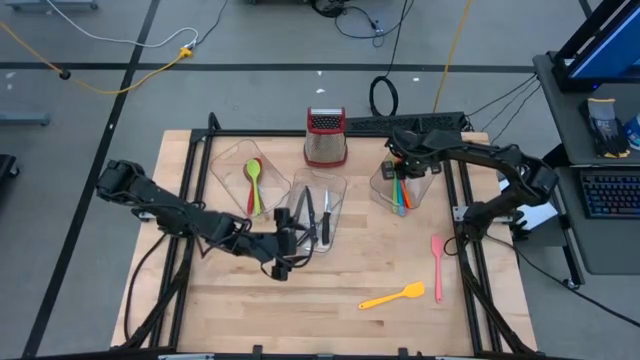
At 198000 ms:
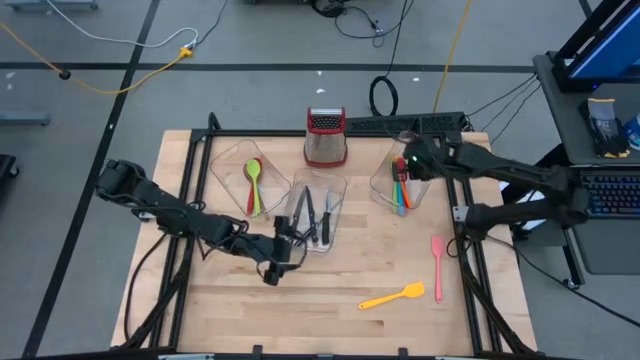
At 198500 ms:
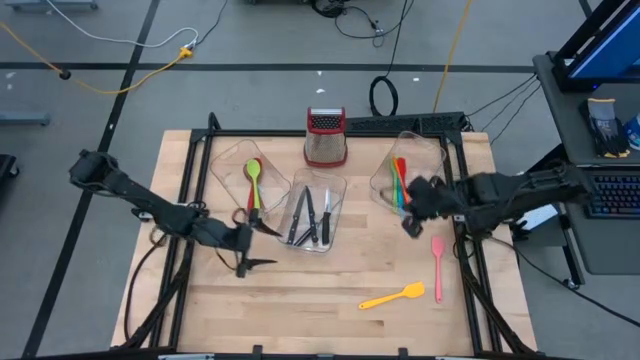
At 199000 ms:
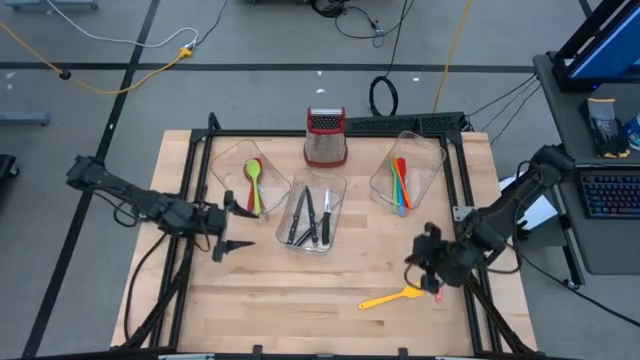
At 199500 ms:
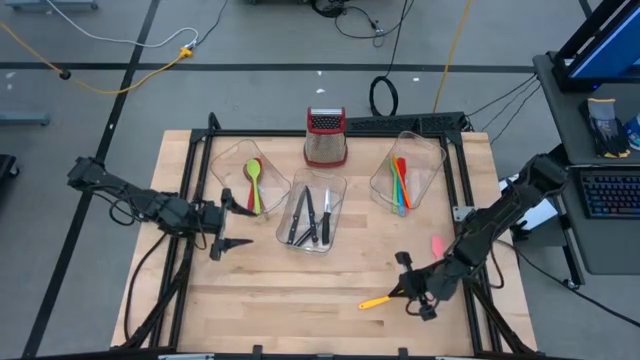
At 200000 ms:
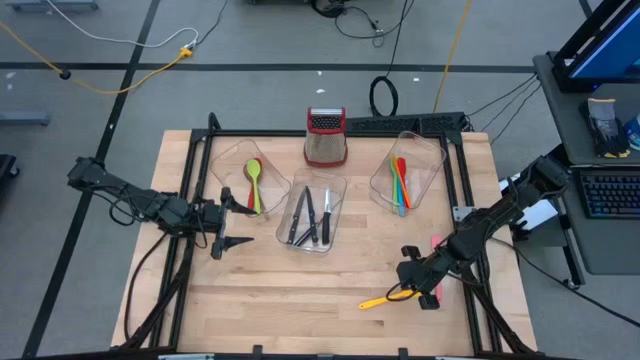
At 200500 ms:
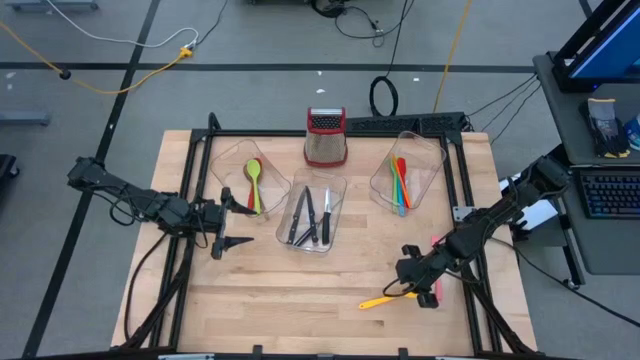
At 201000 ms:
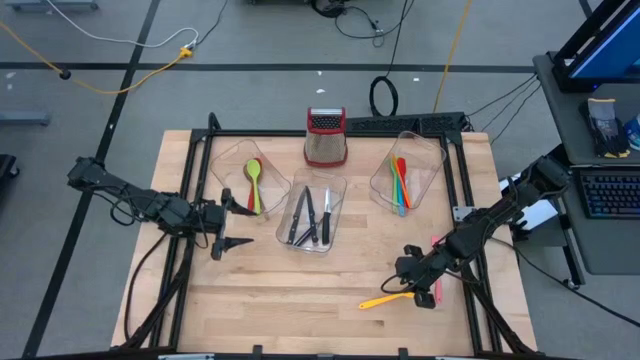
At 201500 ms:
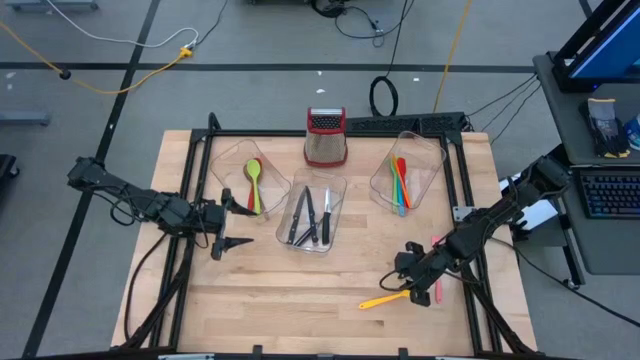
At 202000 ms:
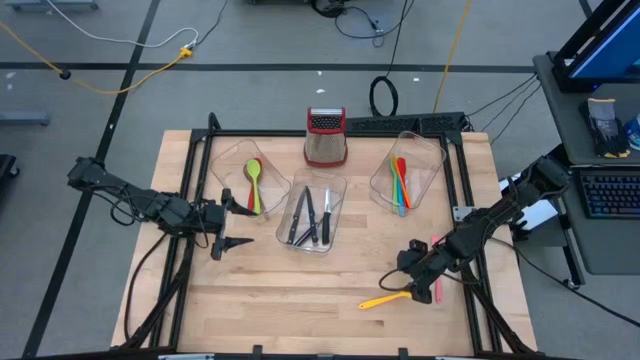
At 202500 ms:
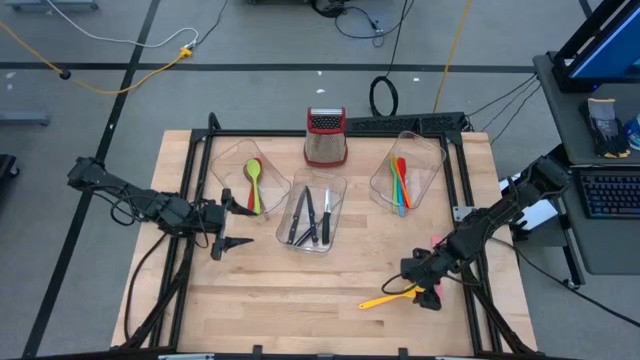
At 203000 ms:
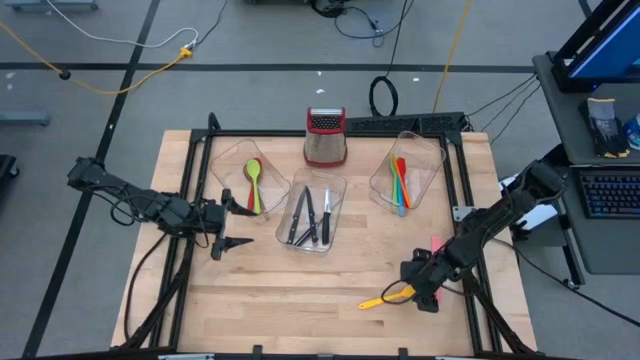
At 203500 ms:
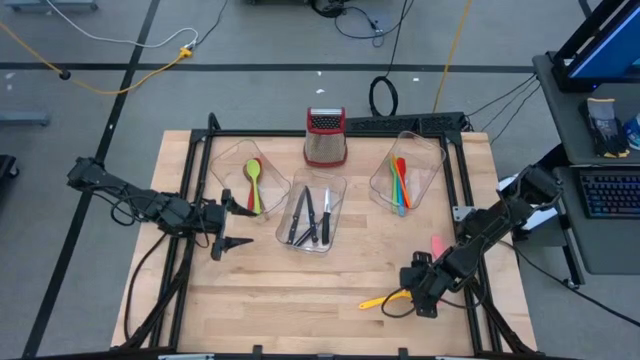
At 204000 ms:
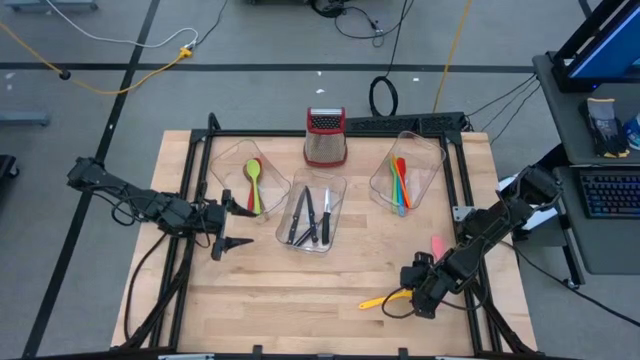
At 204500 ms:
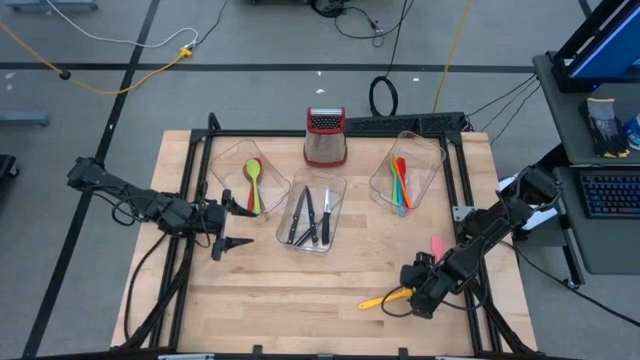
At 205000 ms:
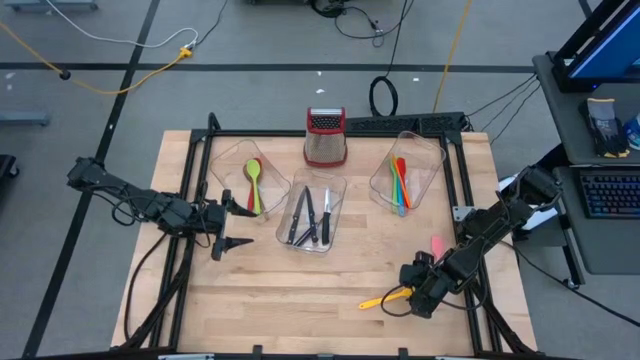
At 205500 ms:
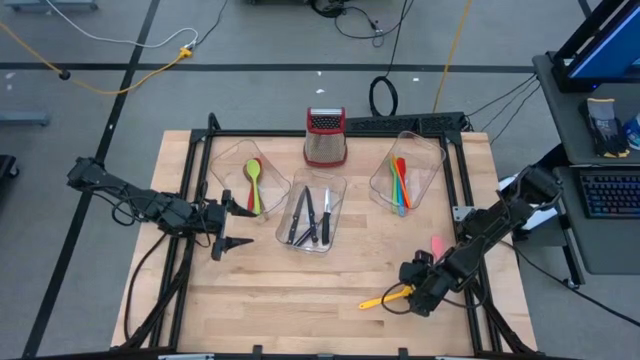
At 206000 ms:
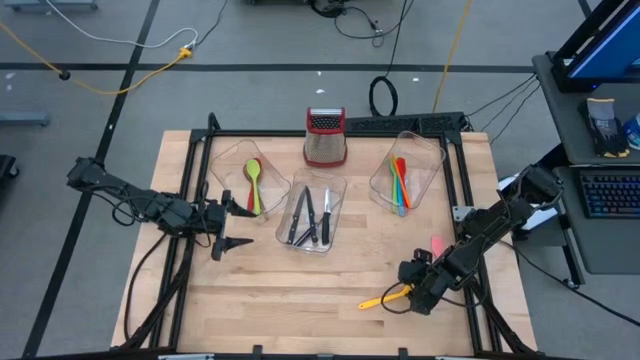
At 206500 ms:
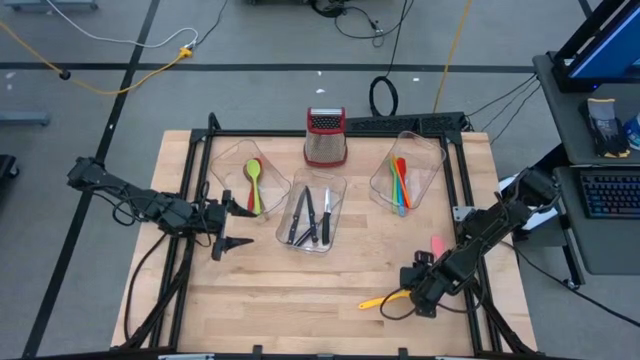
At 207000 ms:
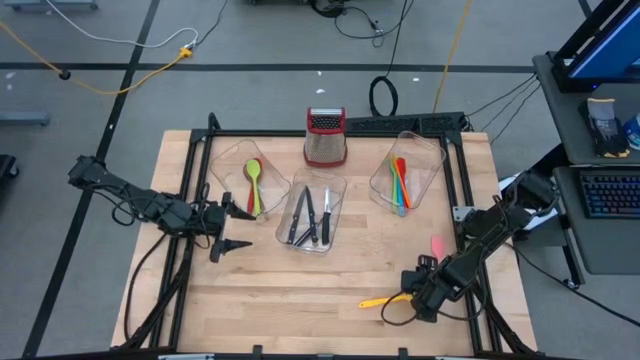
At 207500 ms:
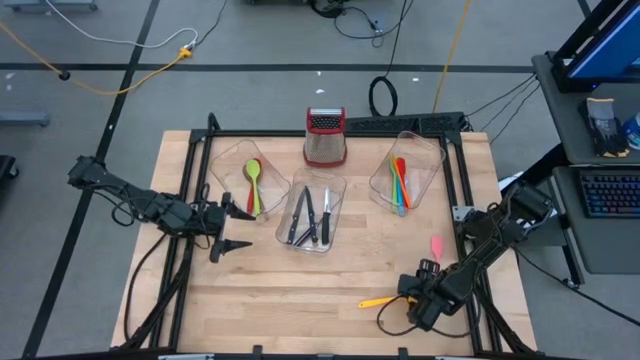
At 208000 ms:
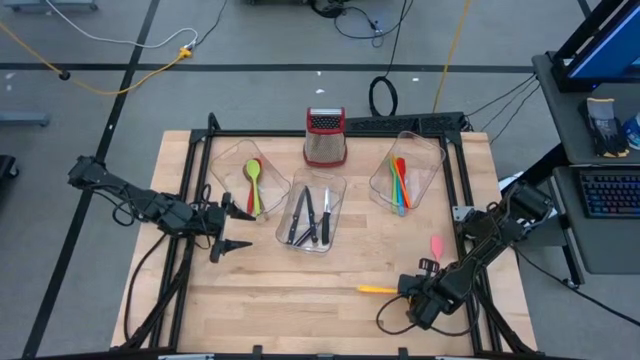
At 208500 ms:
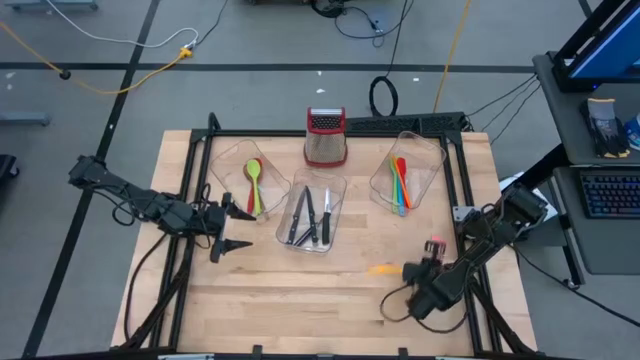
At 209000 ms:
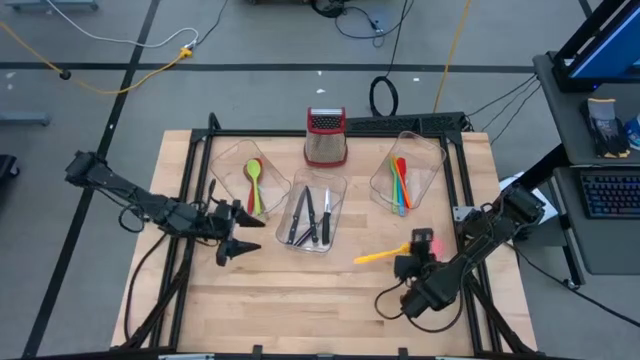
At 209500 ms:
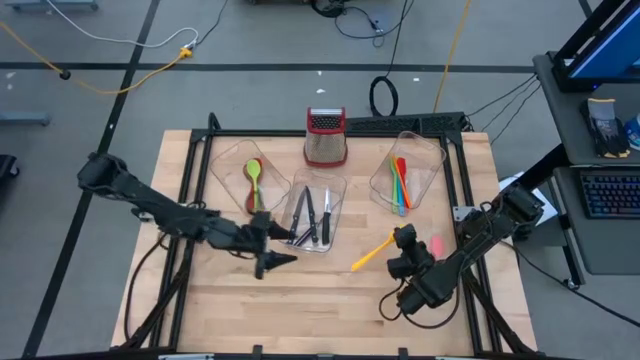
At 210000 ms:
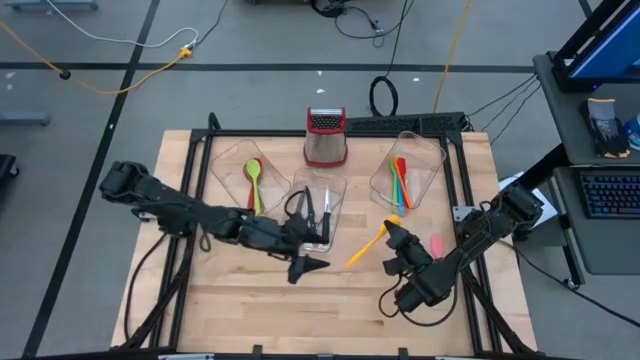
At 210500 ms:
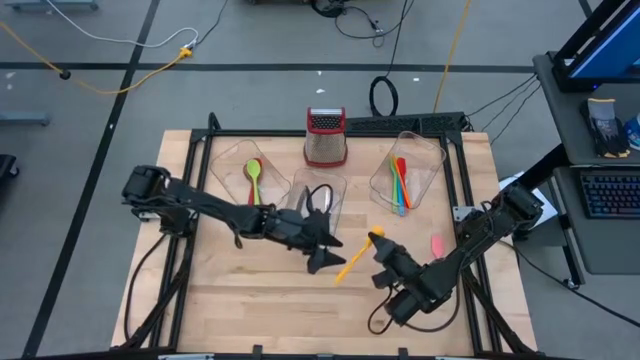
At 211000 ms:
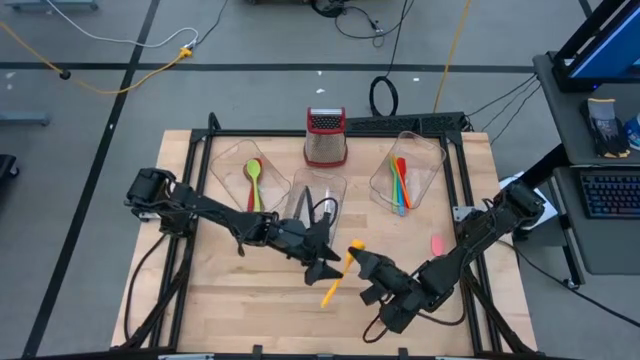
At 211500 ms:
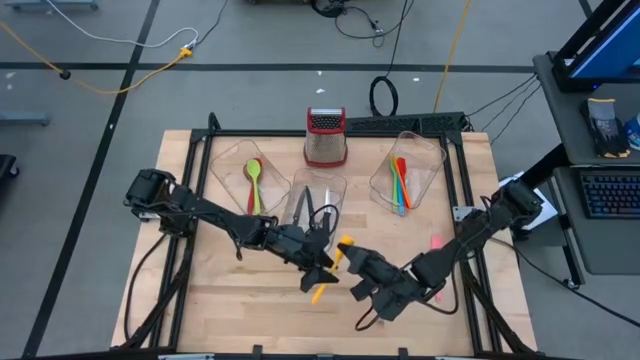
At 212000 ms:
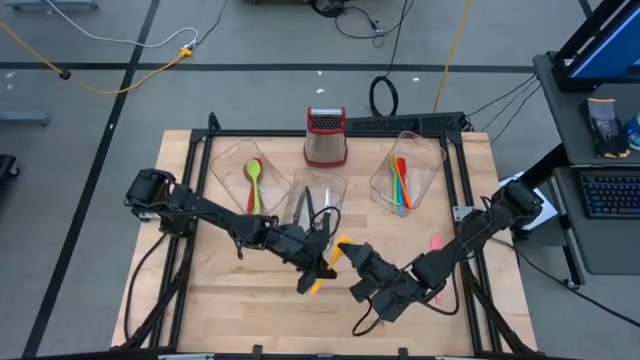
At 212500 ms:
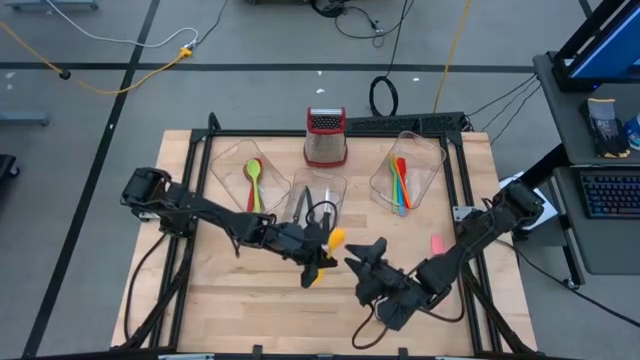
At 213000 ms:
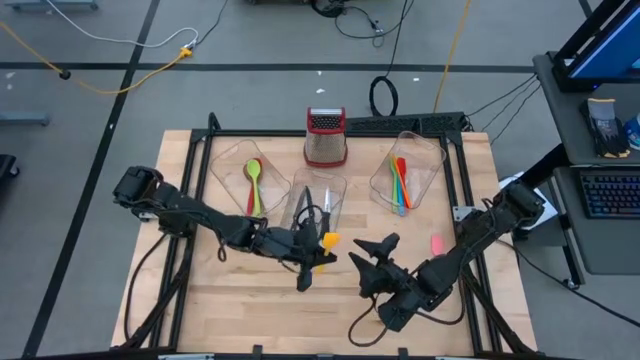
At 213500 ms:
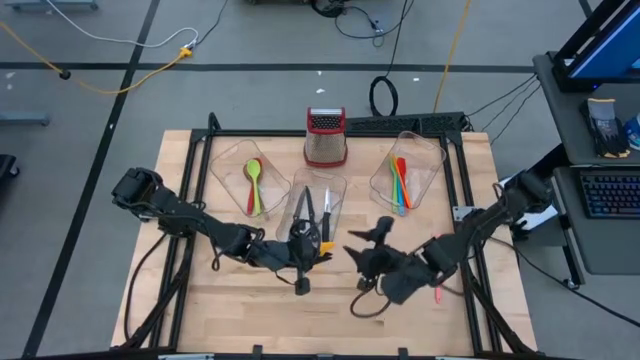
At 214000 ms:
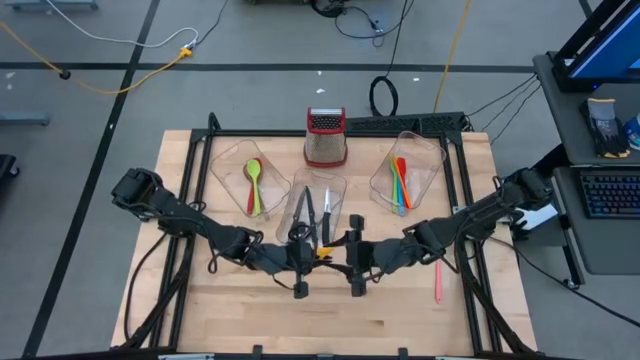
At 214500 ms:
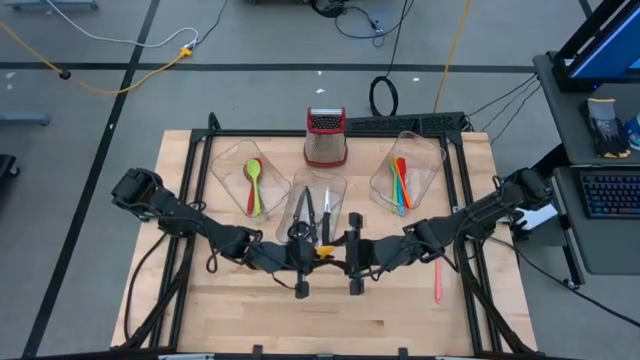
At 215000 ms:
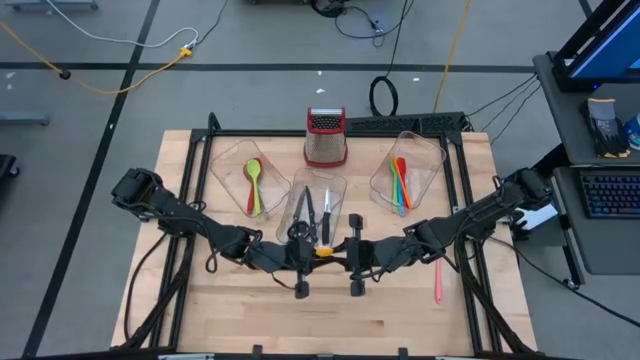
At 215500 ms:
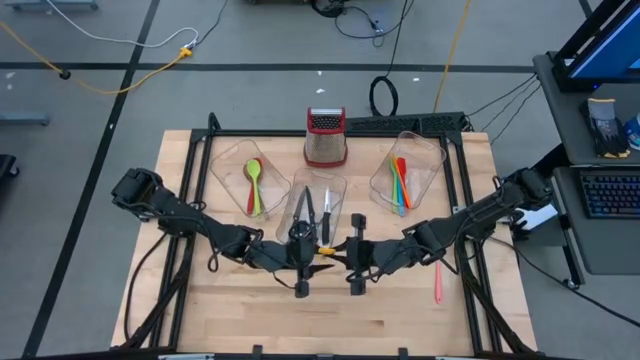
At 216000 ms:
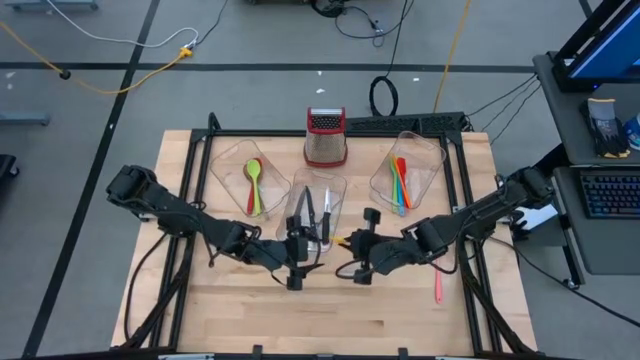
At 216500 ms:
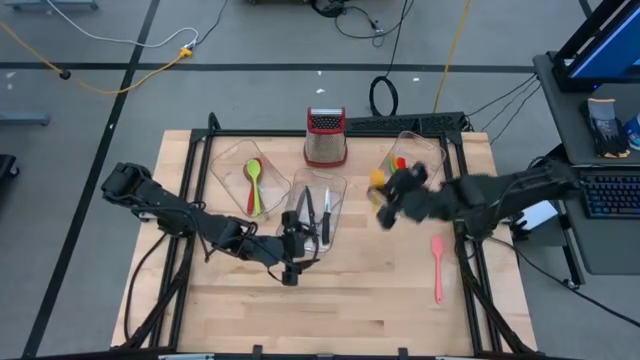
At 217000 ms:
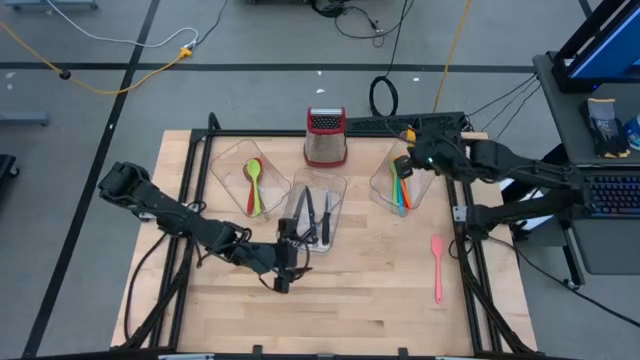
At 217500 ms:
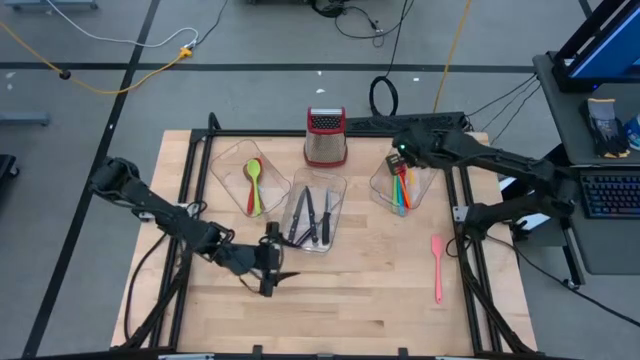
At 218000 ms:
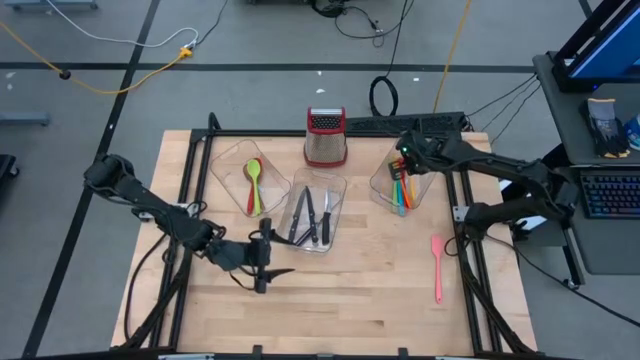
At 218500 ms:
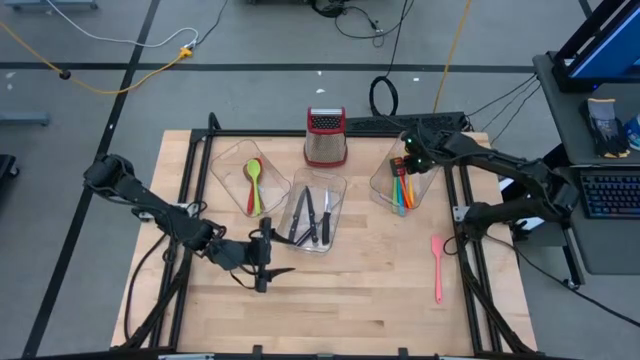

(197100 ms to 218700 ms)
Task: Pick & Place Kitchen Items
Put the yellow spatula on the right transparent bin

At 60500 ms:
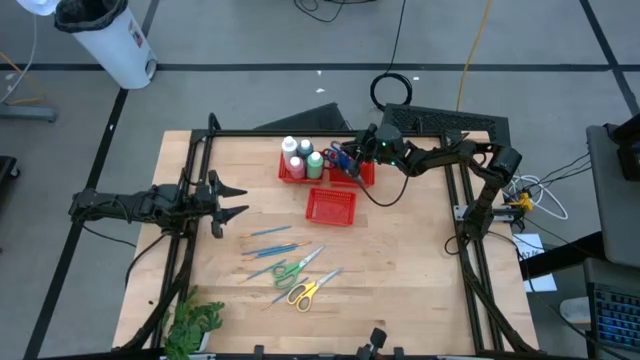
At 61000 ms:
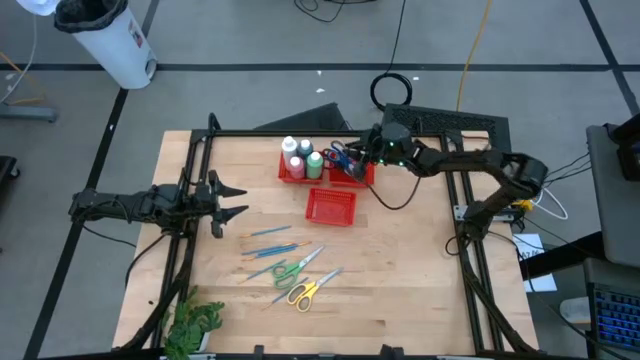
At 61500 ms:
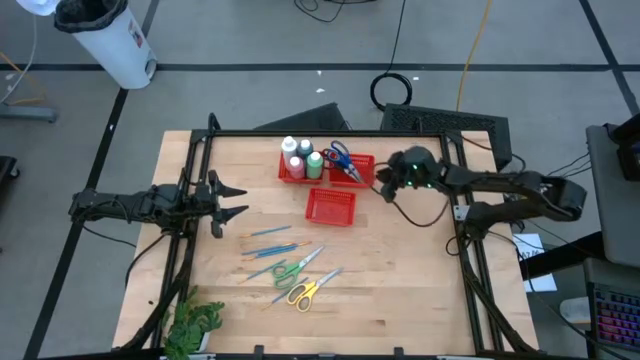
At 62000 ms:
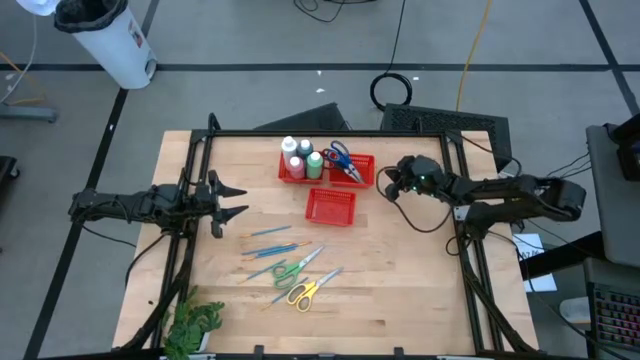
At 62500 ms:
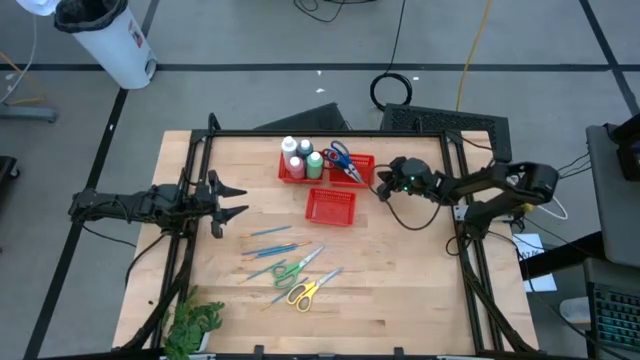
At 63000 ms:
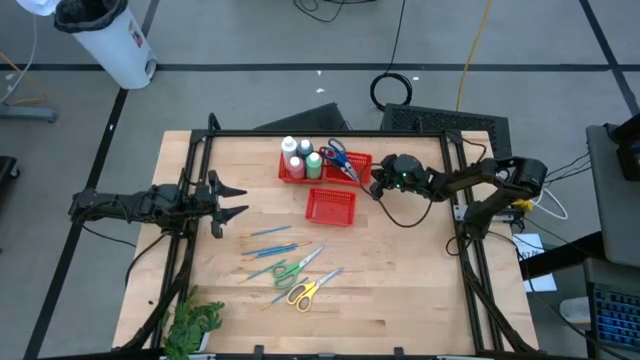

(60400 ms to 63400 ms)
Task: Pick & Place Paint Supplies
Adjust the top right red bin
